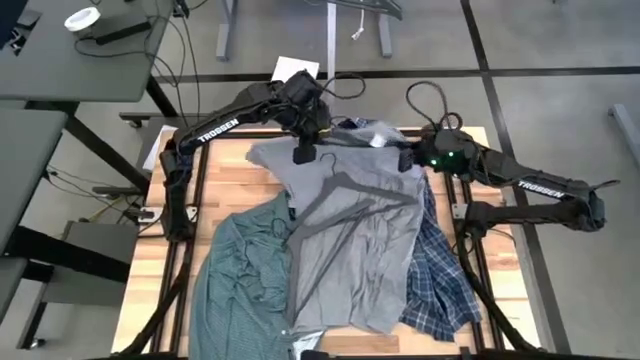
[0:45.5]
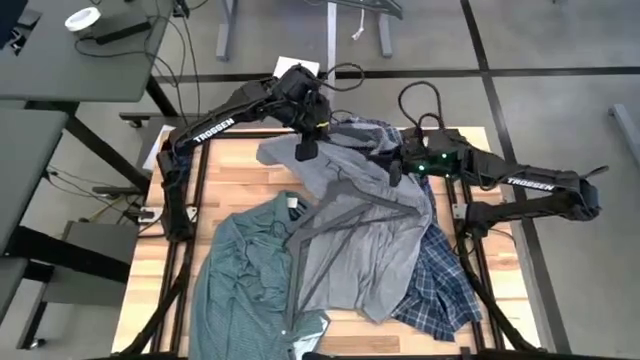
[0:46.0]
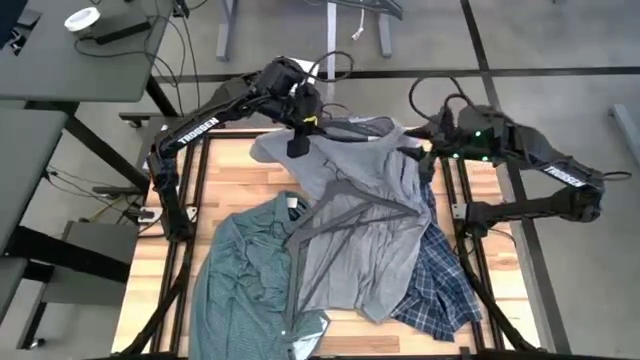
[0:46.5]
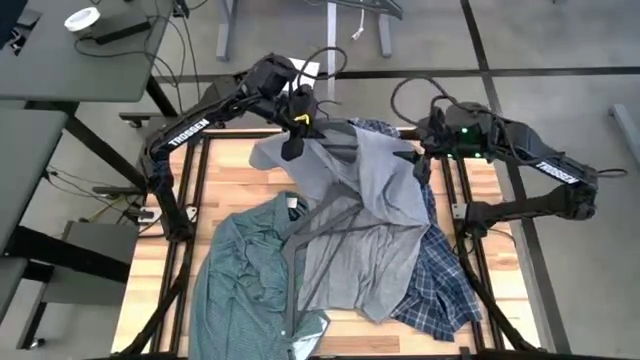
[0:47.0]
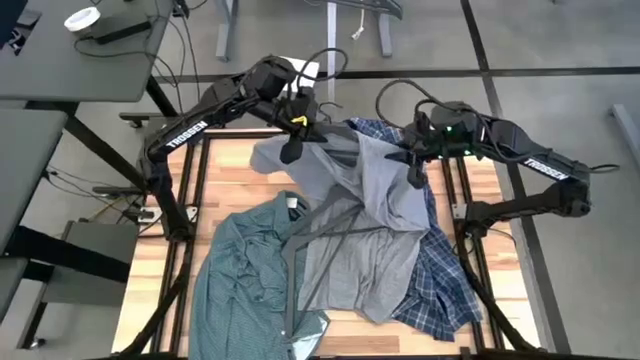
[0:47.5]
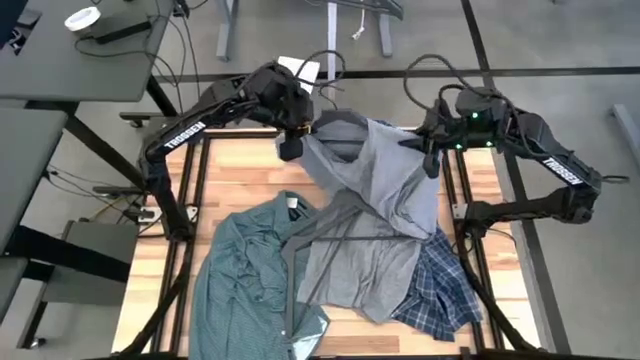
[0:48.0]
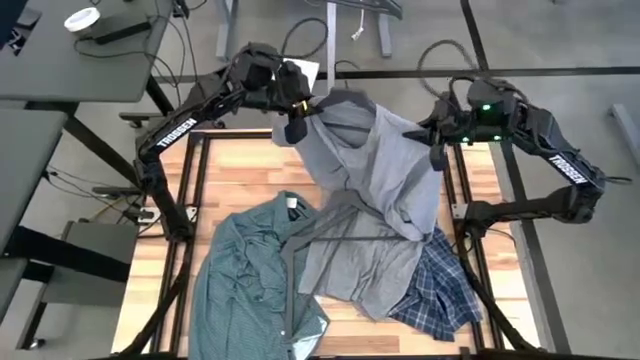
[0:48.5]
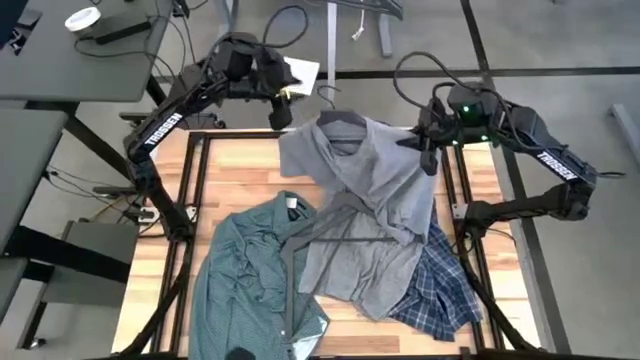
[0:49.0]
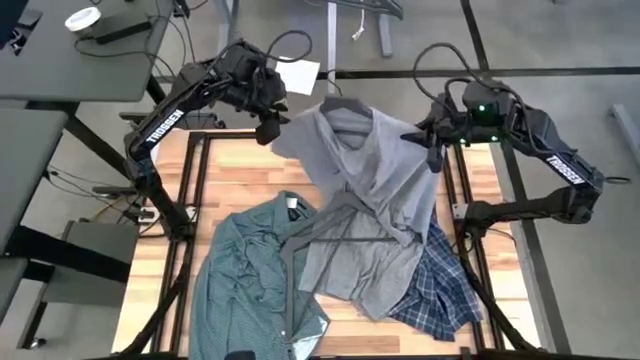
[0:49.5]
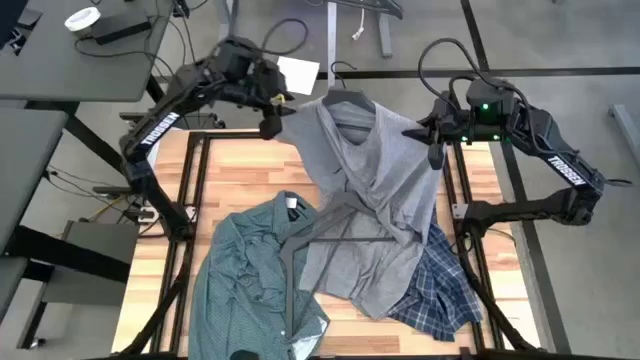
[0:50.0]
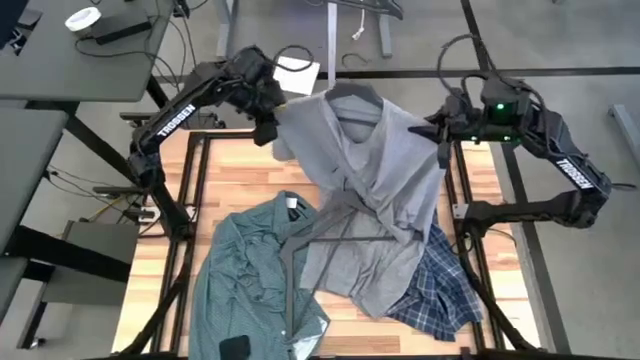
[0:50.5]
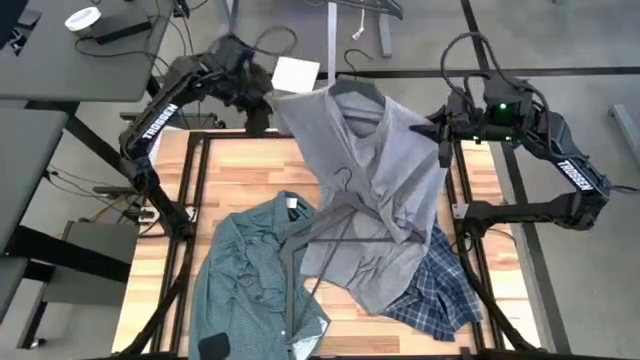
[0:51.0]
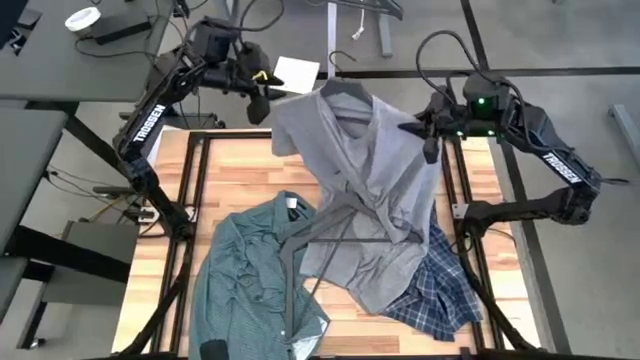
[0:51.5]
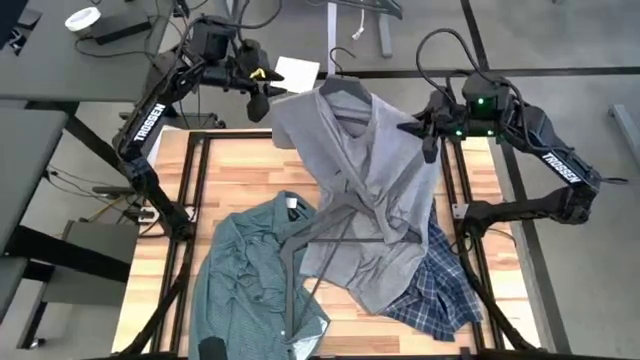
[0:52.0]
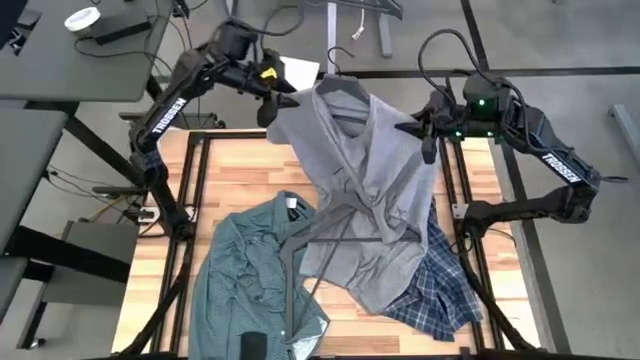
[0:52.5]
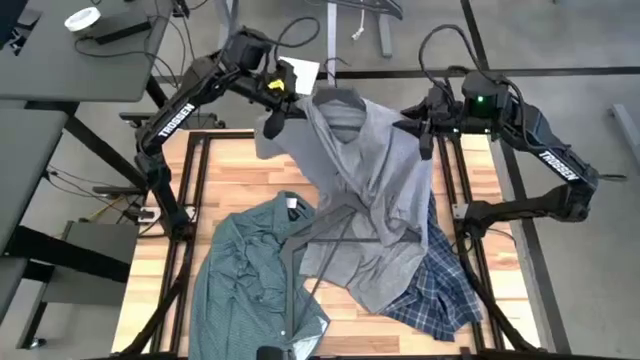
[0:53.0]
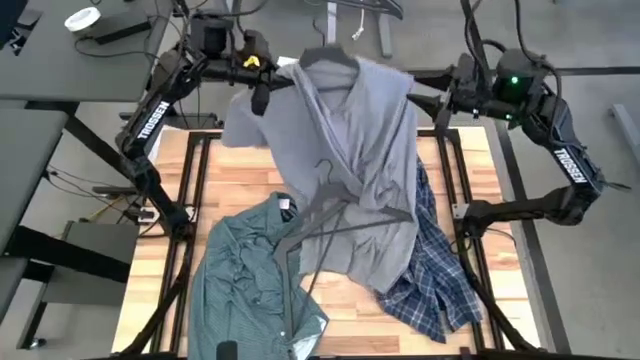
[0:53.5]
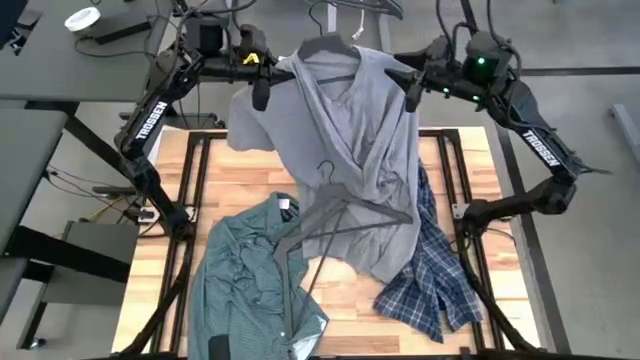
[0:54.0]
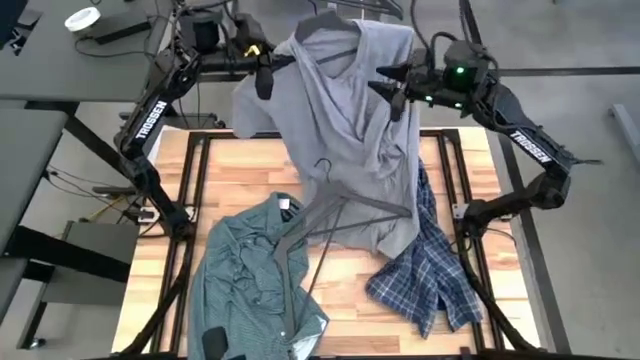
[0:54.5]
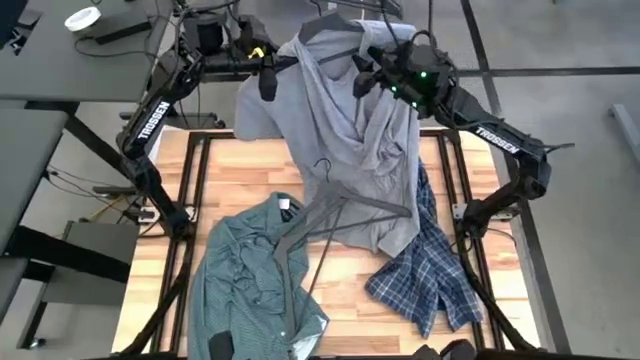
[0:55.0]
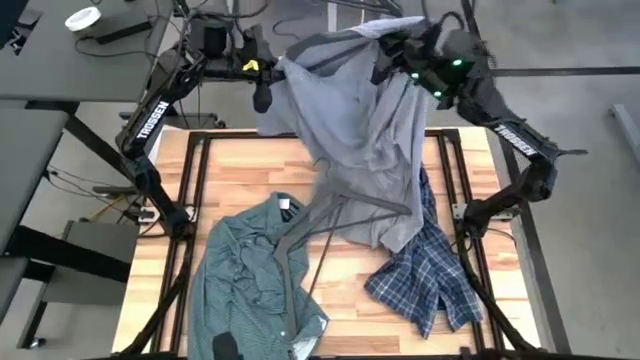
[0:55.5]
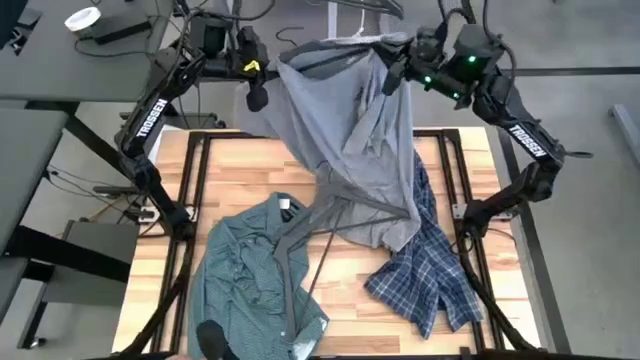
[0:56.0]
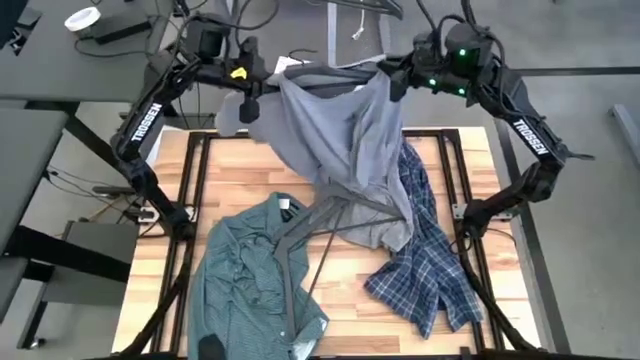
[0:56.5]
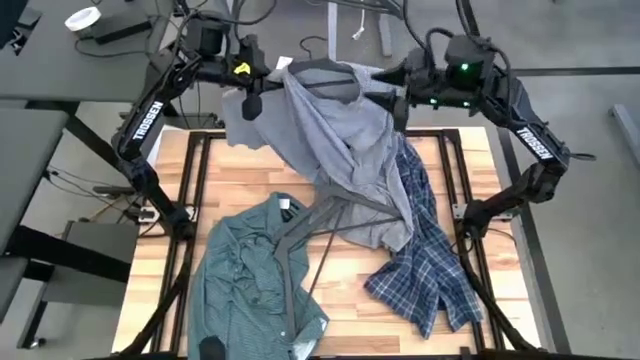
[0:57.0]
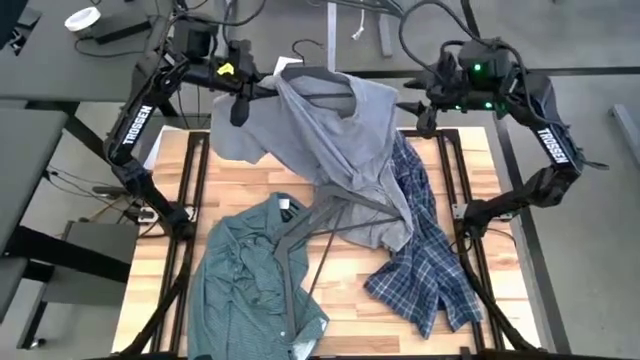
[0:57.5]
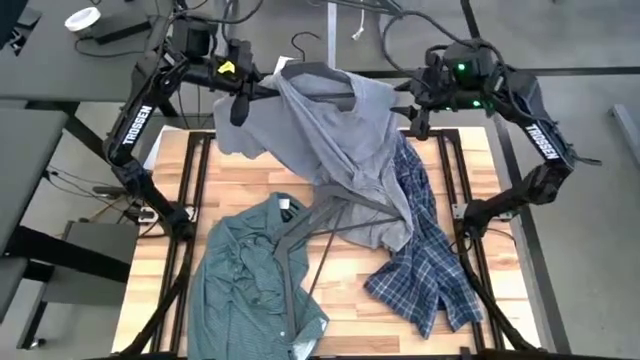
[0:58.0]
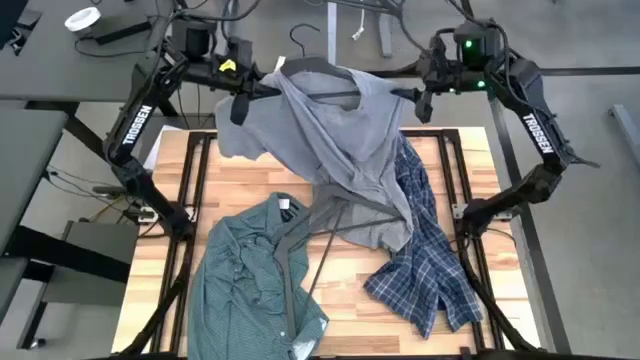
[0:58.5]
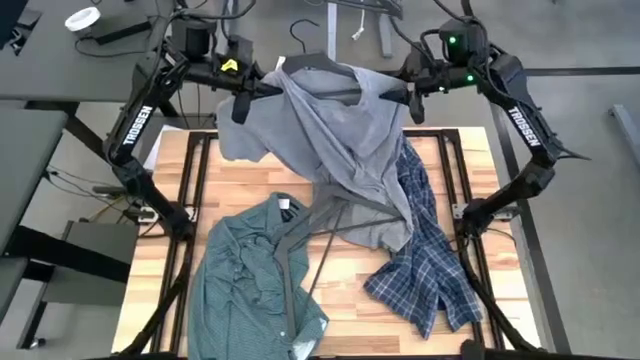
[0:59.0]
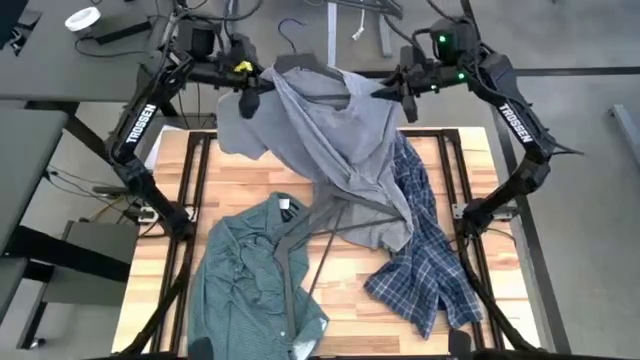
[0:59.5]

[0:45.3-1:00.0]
Task: Hang clothes
Put the gray t-shirt on the gray hanger

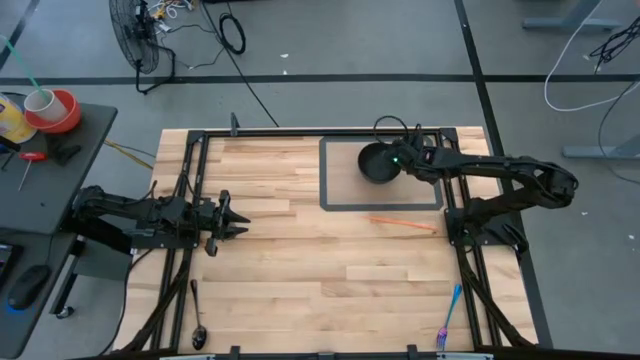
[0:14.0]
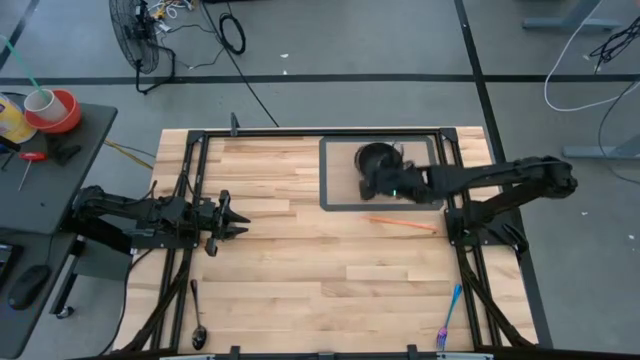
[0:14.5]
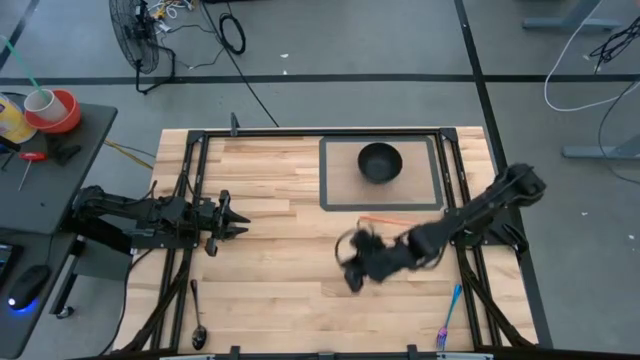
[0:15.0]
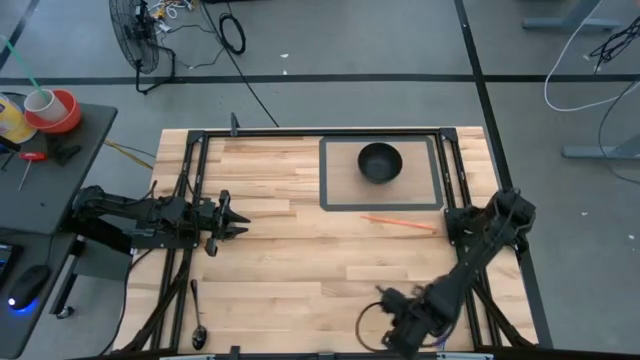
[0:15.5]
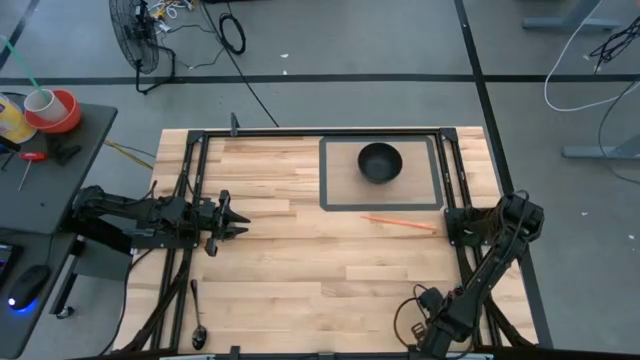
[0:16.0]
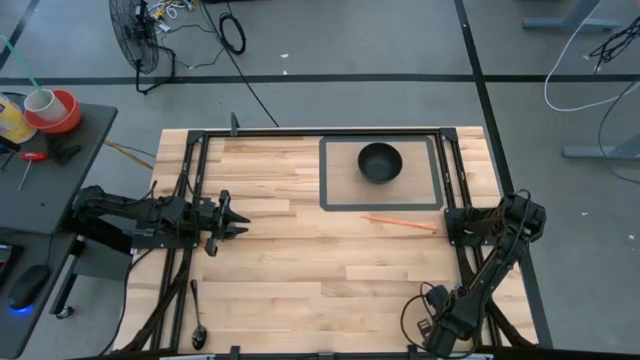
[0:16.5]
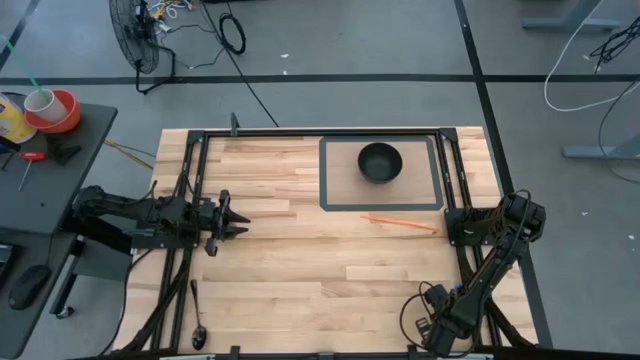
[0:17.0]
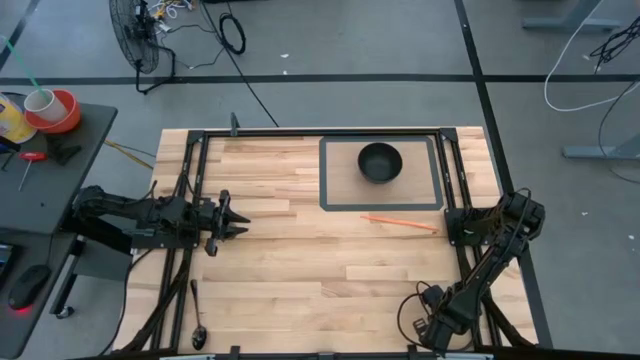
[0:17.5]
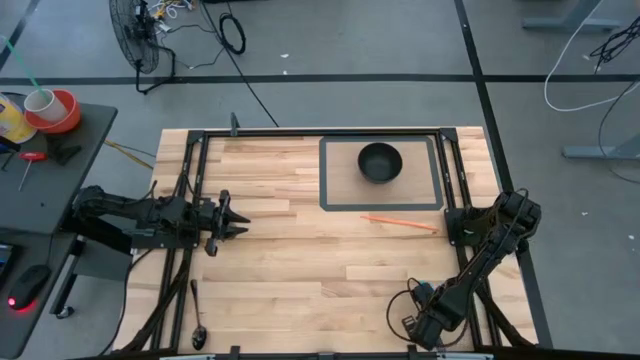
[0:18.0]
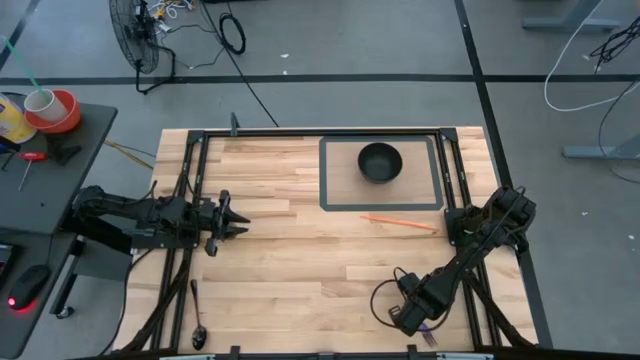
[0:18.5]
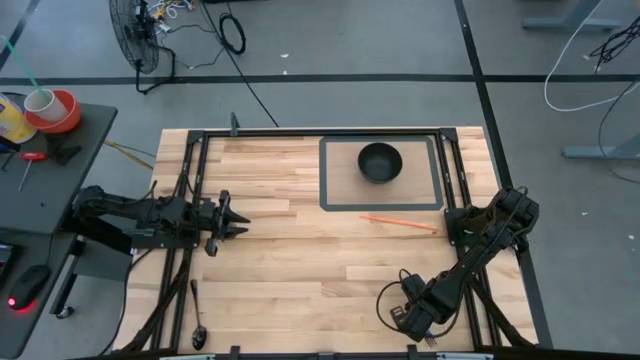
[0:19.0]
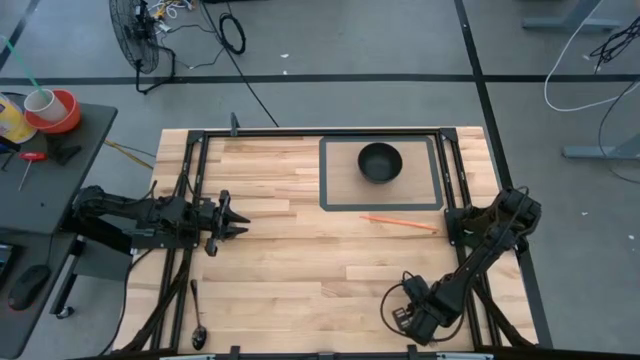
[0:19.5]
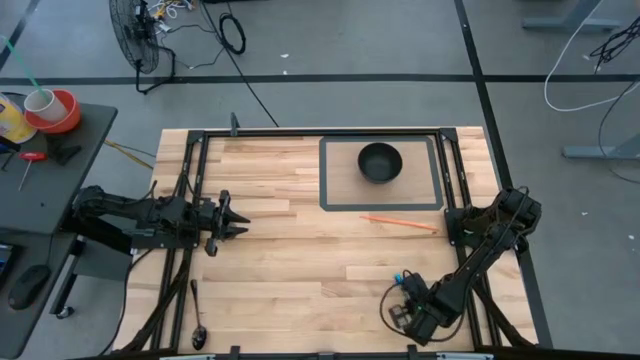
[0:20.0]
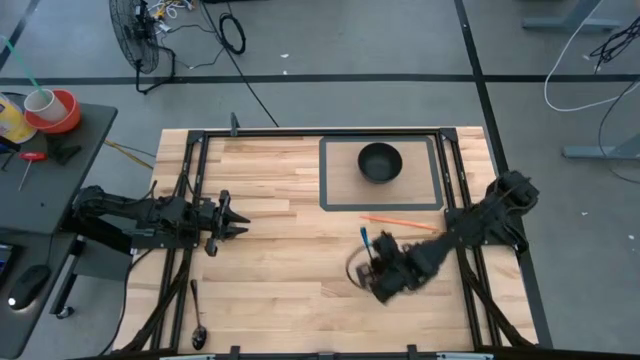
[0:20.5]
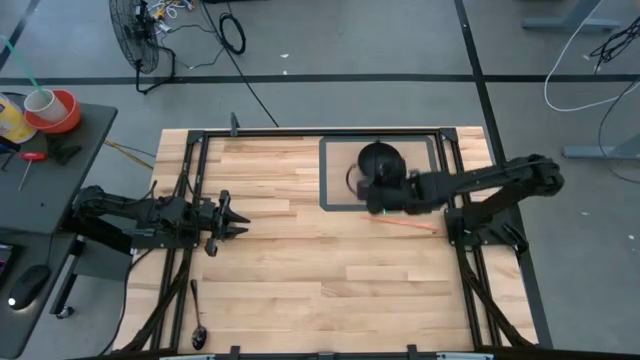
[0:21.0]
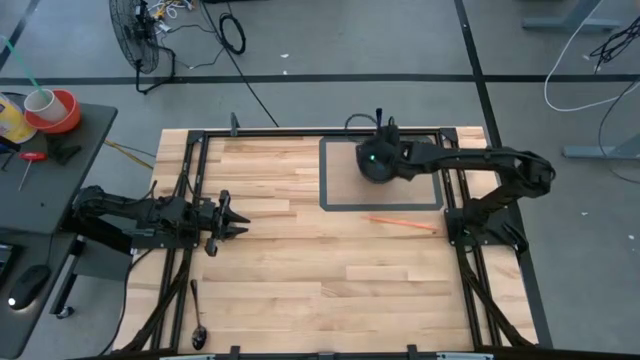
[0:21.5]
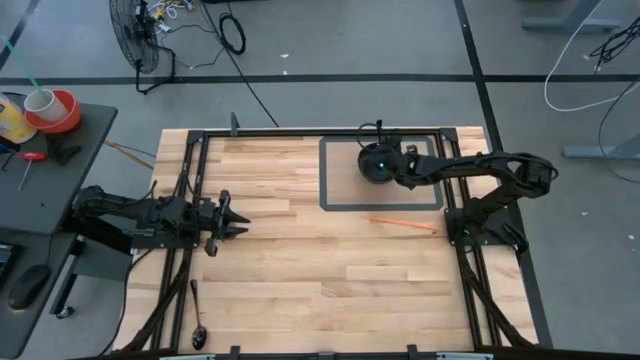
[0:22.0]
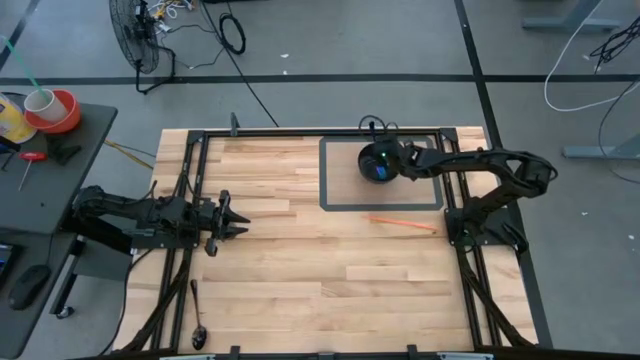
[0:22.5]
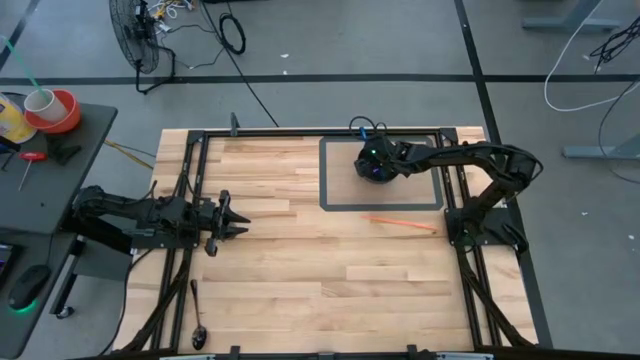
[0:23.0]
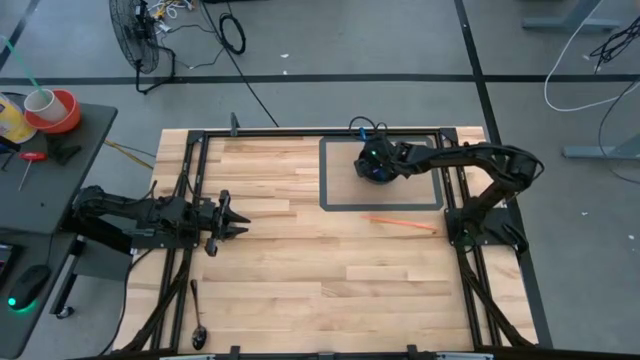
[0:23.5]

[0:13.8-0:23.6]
Task: Pick & Place Utensil
Put the blue fork into the black bowl on the brown mat
